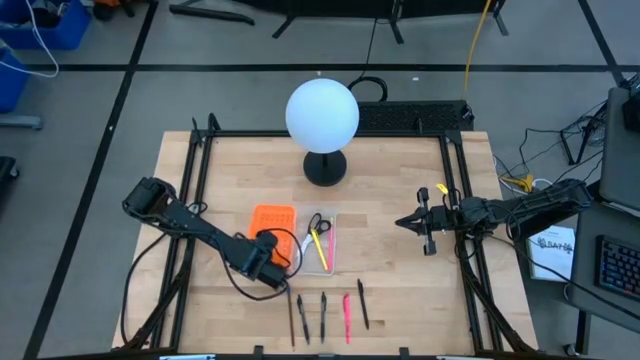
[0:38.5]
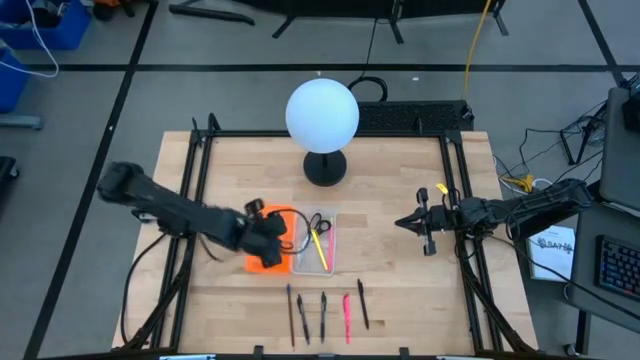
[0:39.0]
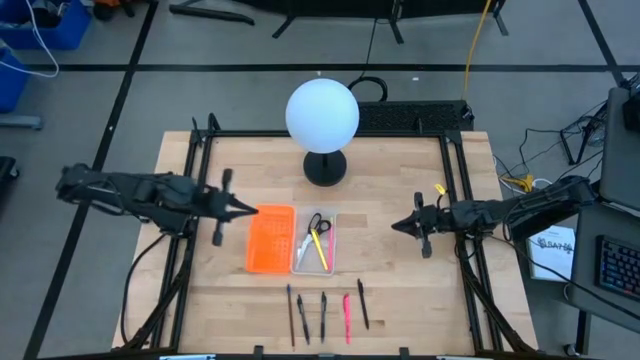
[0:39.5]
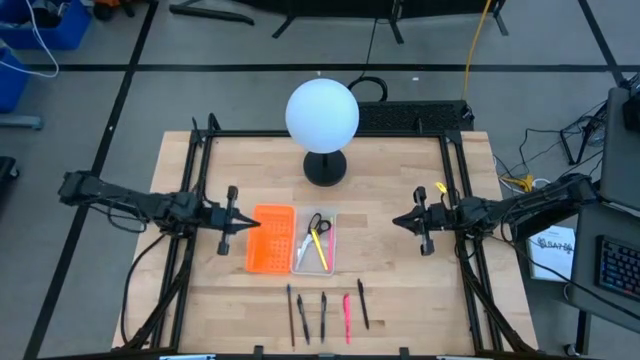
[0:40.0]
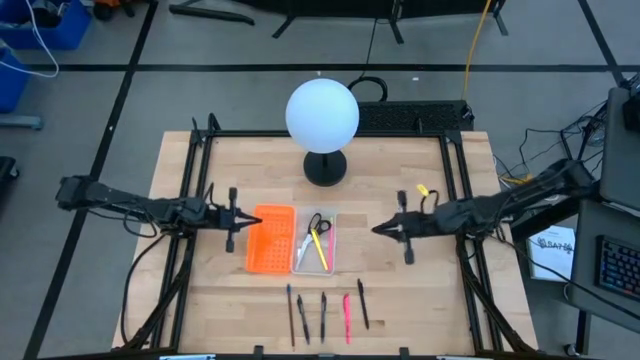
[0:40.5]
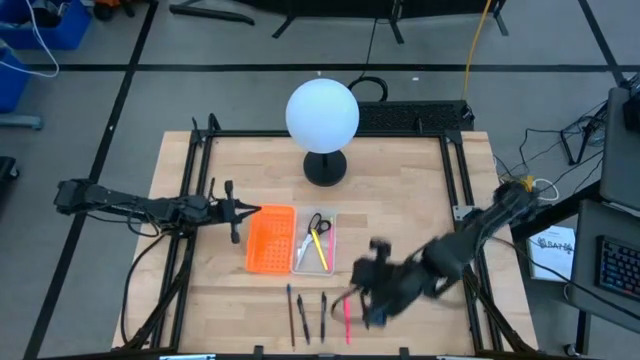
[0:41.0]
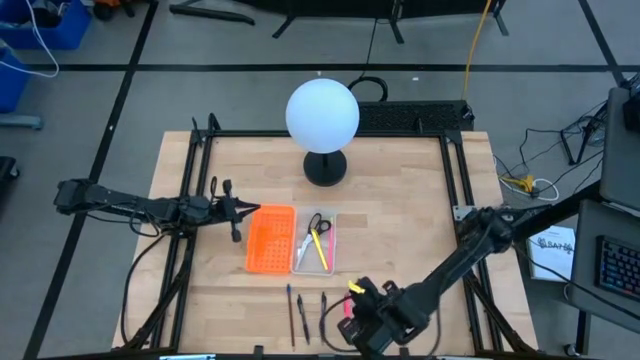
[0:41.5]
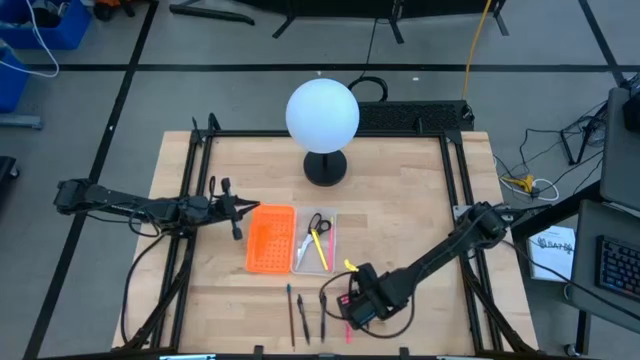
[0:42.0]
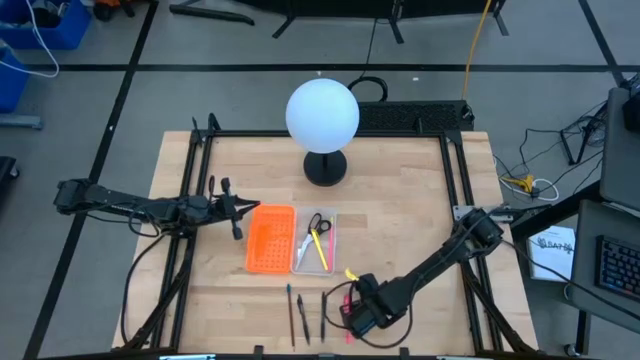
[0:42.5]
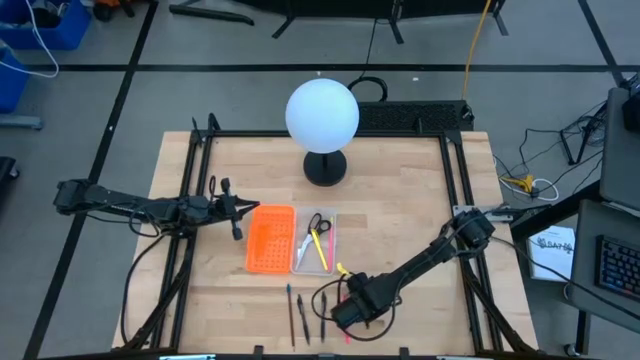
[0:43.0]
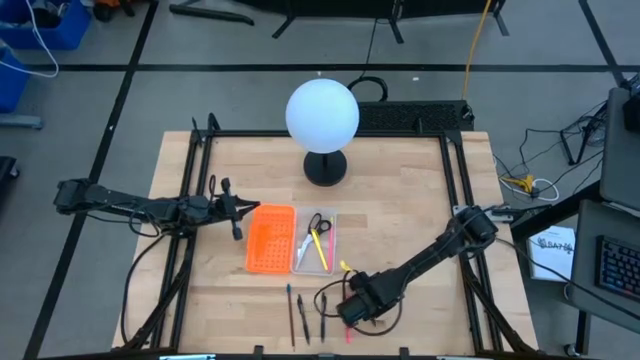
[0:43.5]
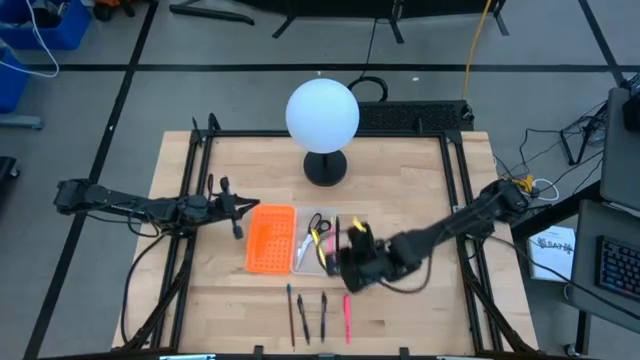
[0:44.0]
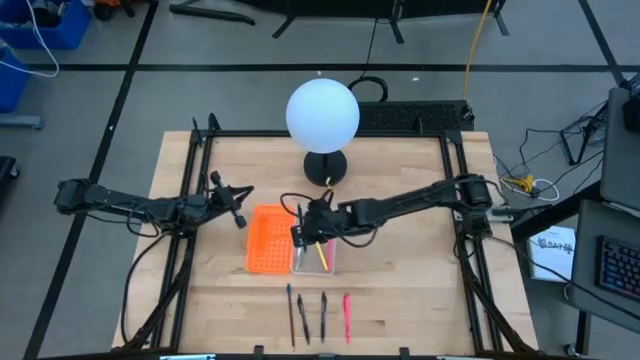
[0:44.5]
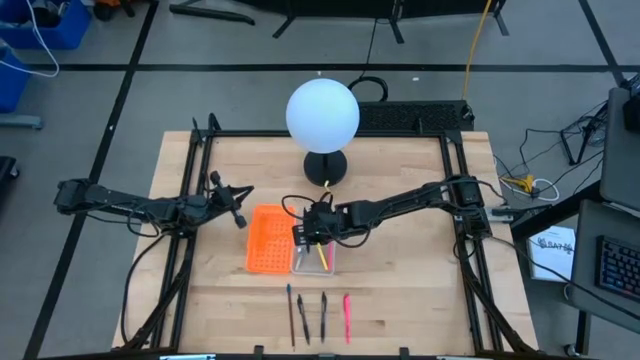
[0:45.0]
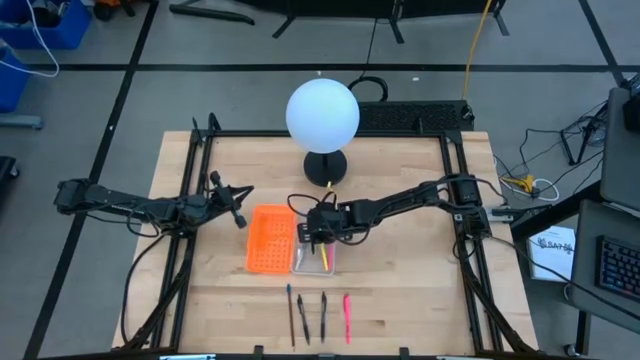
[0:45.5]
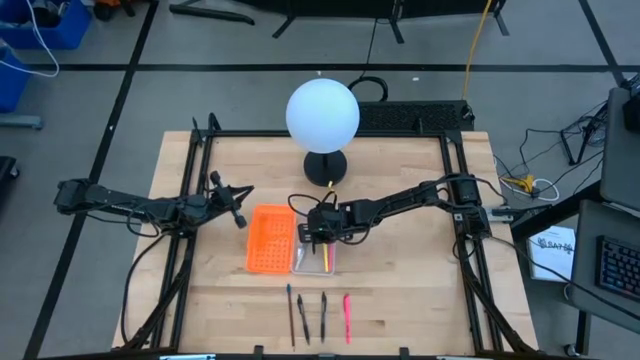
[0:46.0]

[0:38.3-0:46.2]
Task: Pick & place school supplies into a supply box
Put the black pen into the orange supply box

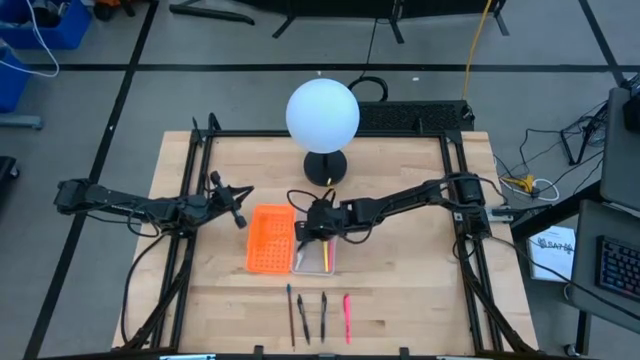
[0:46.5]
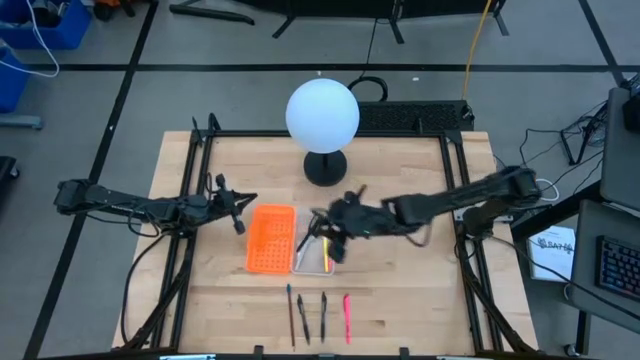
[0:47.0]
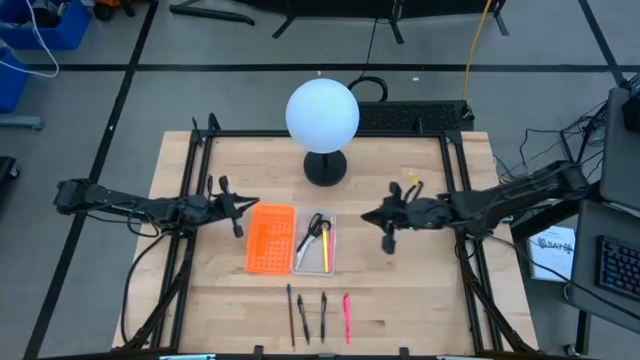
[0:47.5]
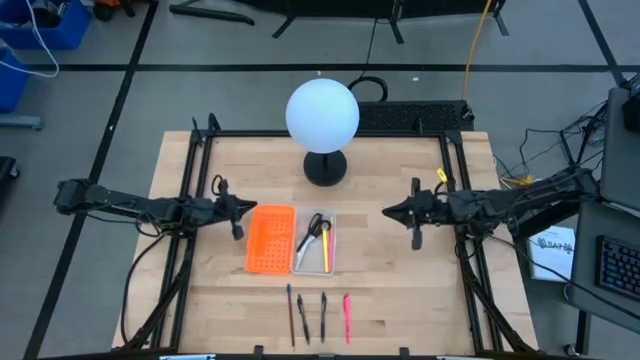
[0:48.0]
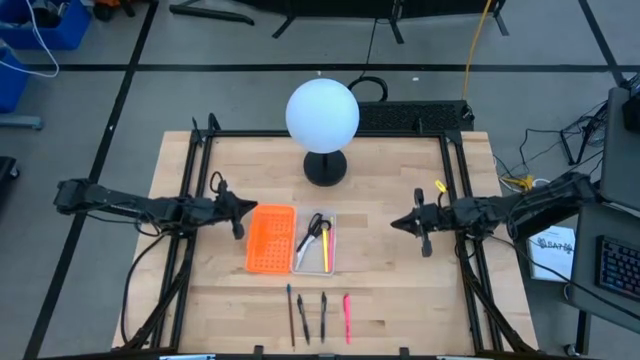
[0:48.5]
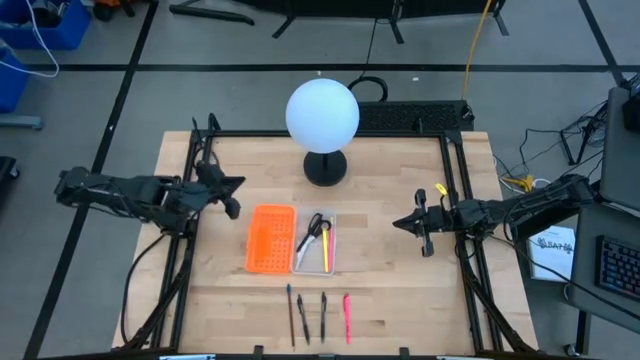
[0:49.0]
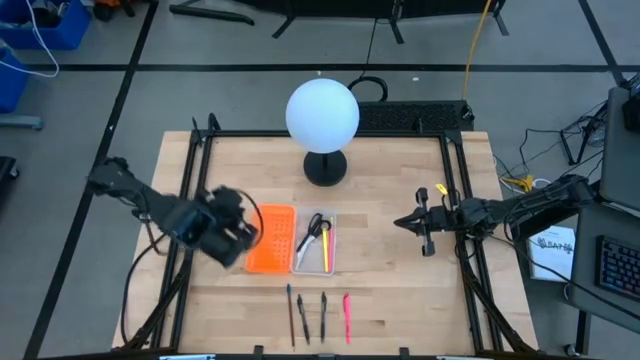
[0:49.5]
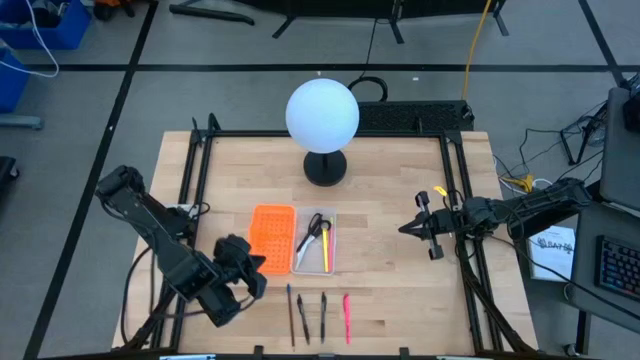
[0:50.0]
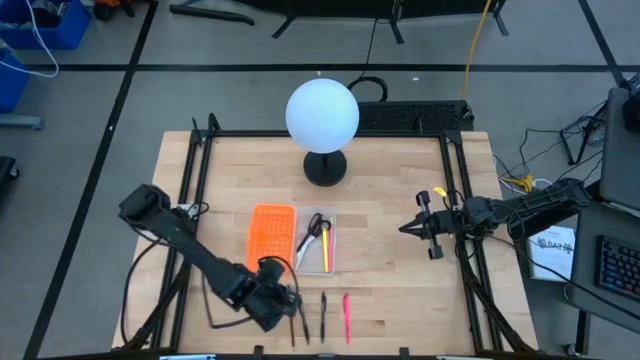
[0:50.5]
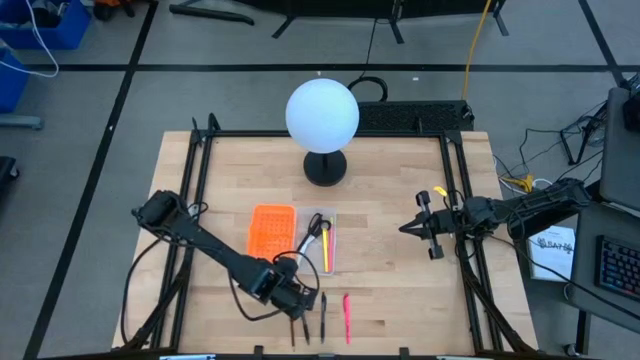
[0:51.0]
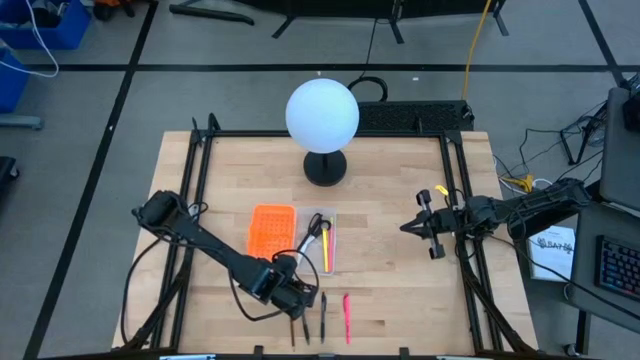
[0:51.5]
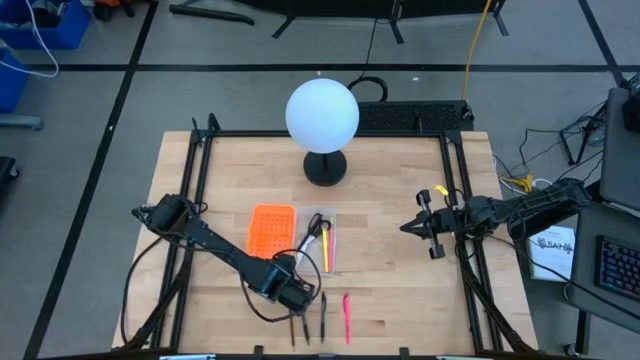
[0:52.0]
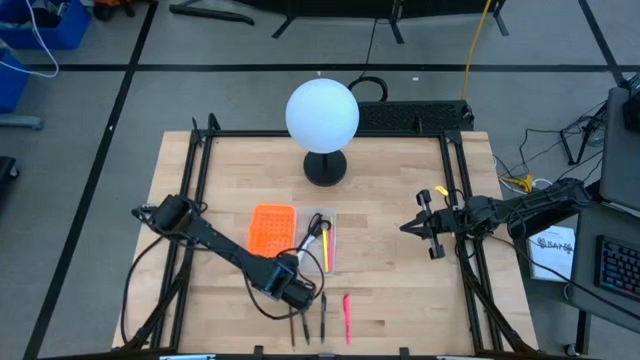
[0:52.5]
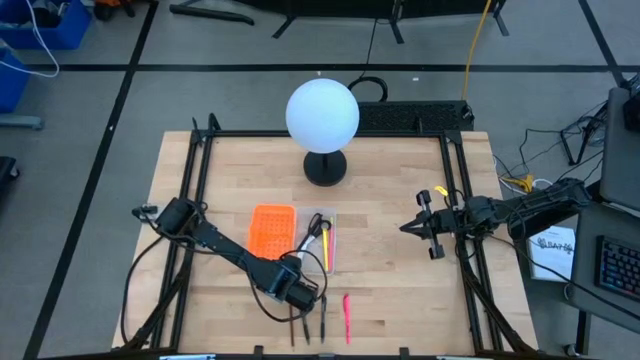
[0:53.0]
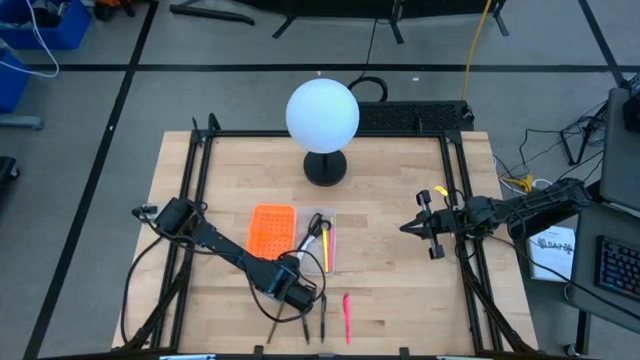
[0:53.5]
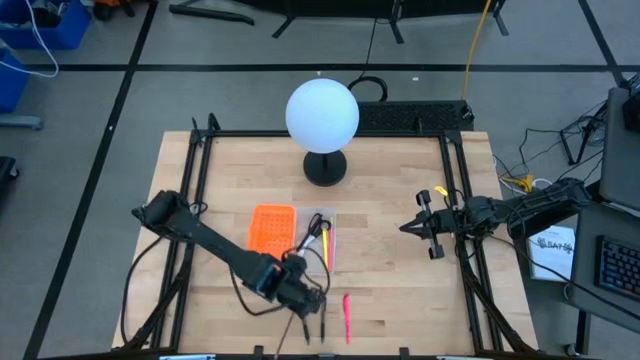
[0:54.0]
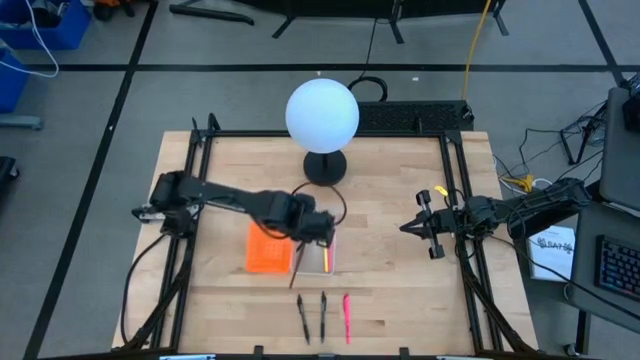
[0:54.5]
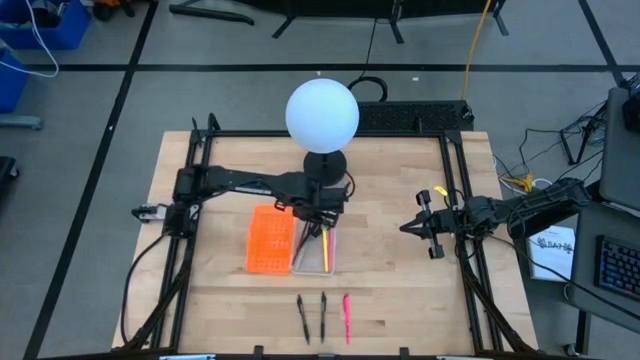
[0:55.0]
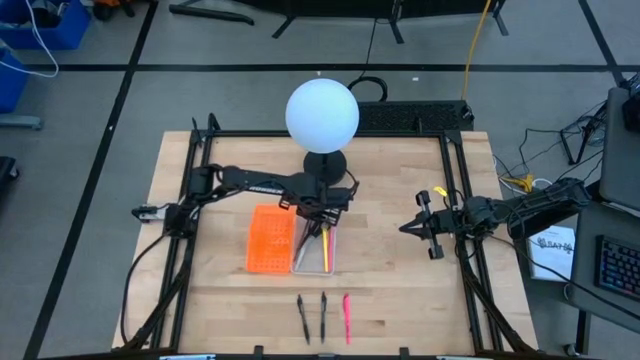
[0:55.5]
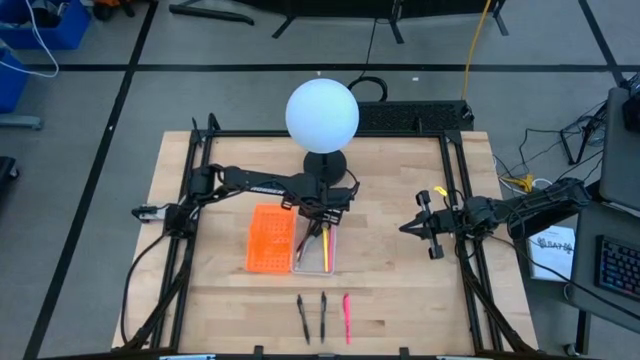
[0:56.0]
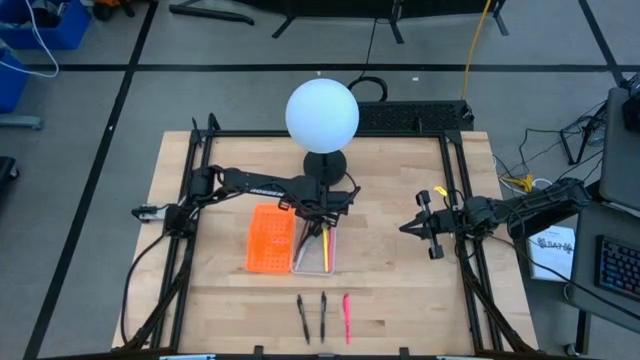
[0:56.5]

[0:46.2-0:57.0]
Put the brown pencil into the orange supply box

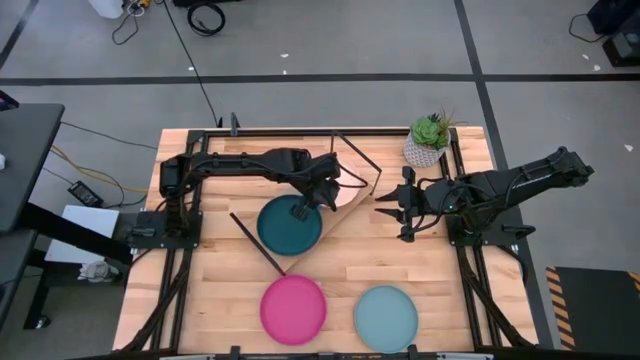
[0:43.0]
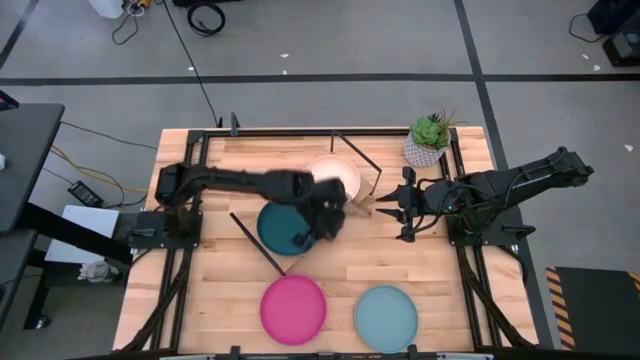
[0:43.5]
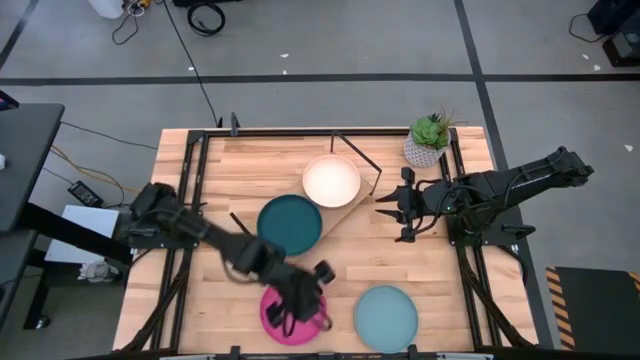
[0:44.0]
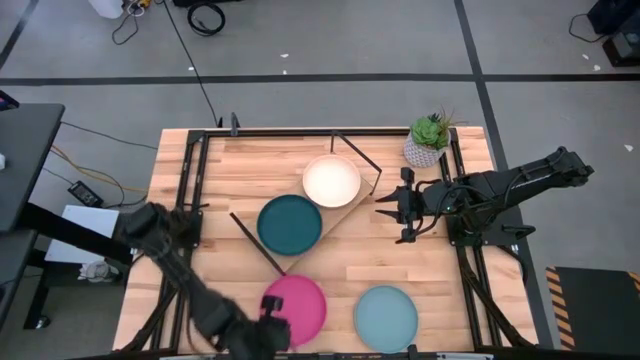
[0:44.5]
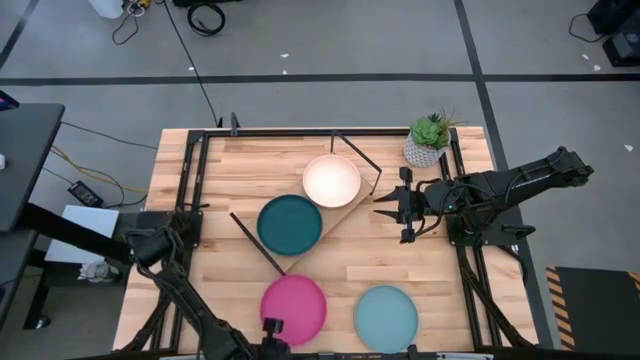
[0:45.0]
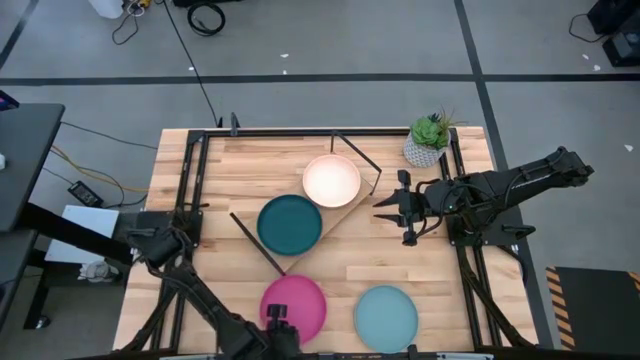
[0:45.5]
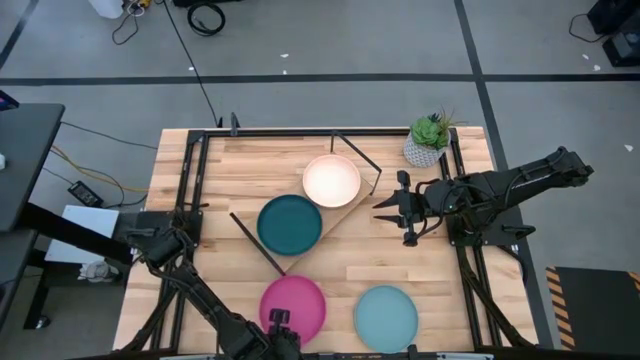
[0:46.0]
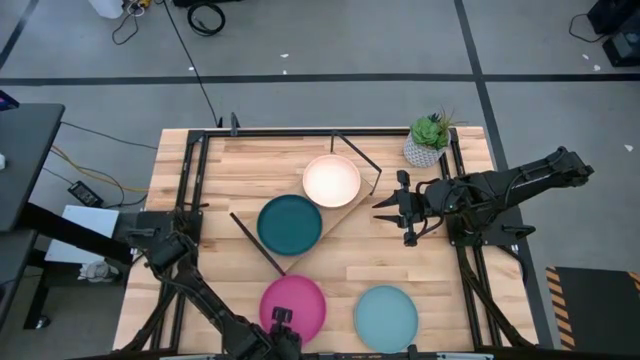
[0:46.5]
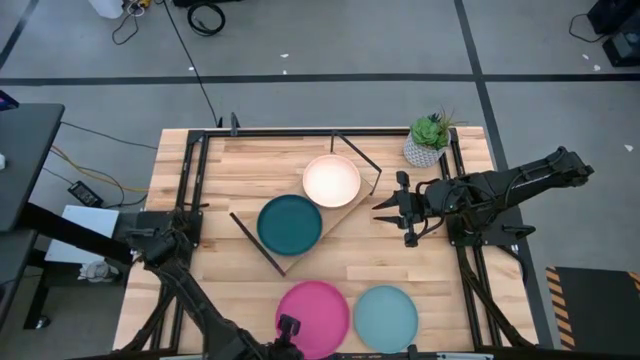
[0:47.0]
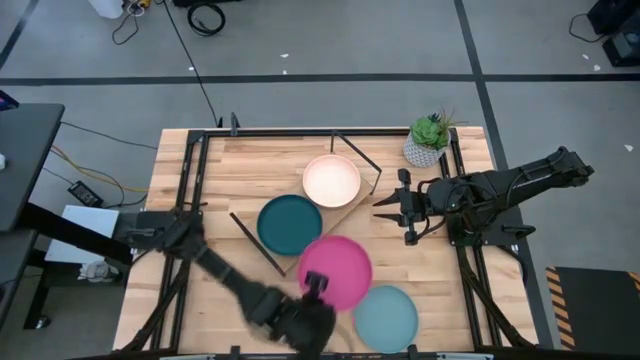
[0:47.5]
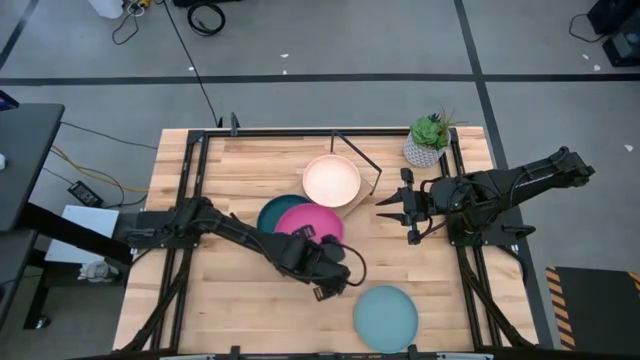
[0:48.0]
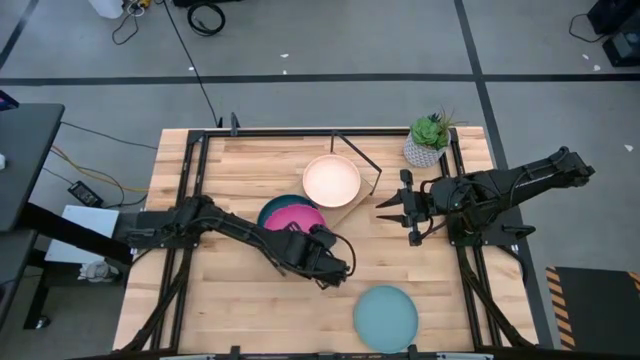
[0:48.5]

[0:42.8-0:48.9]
Task: Place and stack plates onto a shelf
Stack the pink plate on top of the dark blue plate on the shelf
